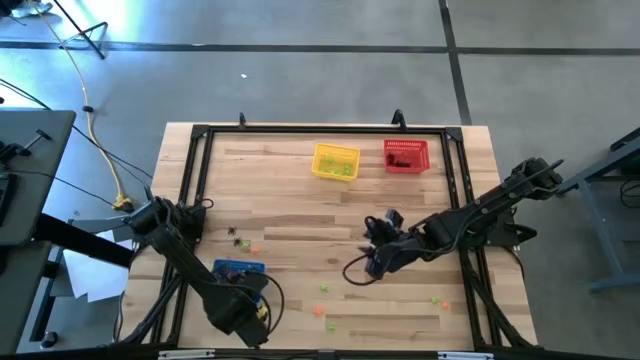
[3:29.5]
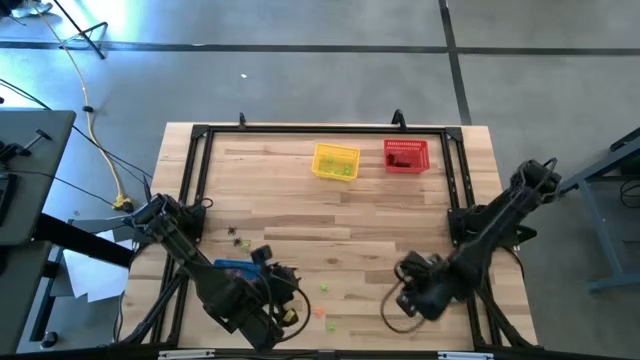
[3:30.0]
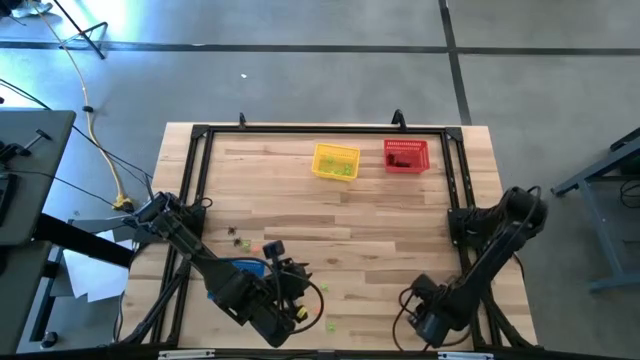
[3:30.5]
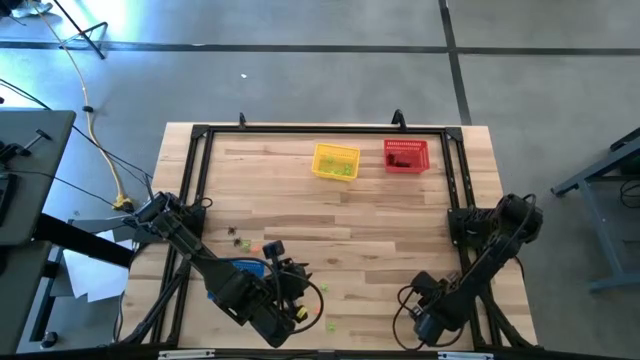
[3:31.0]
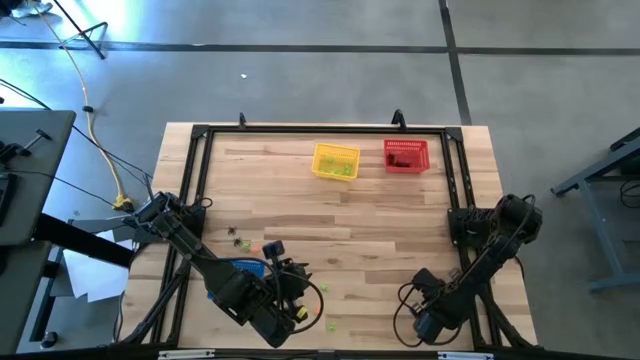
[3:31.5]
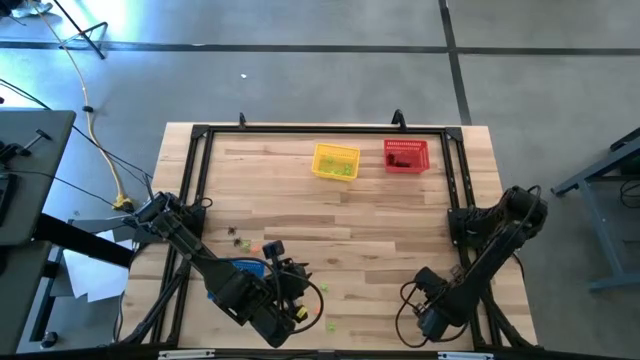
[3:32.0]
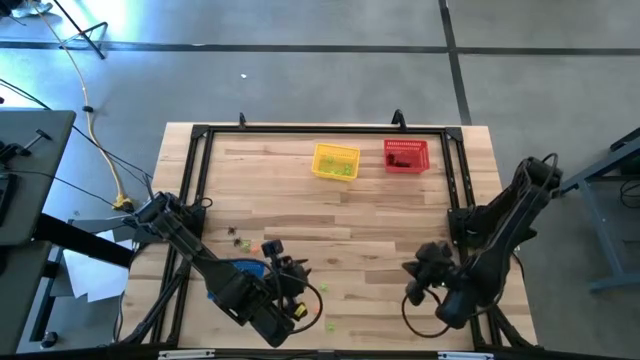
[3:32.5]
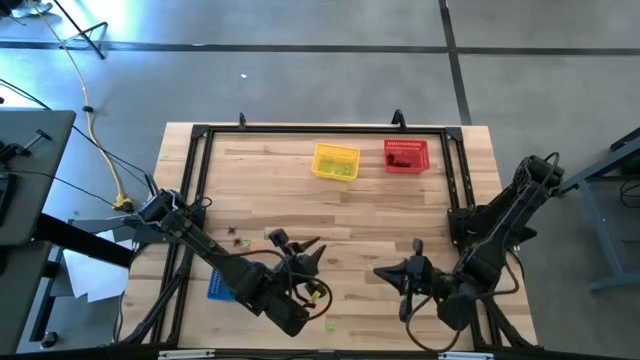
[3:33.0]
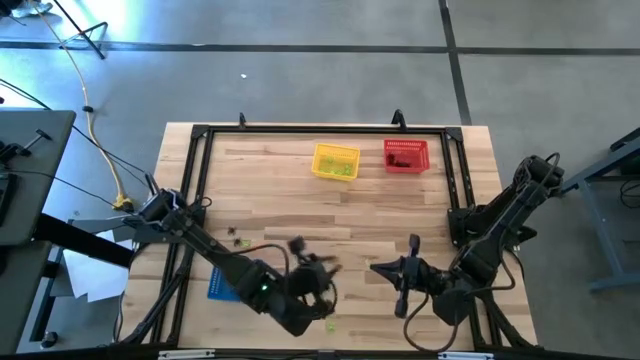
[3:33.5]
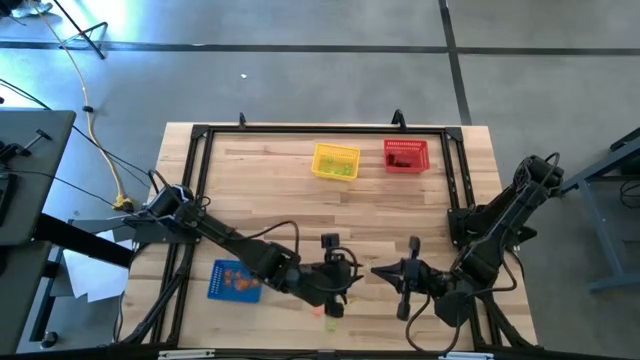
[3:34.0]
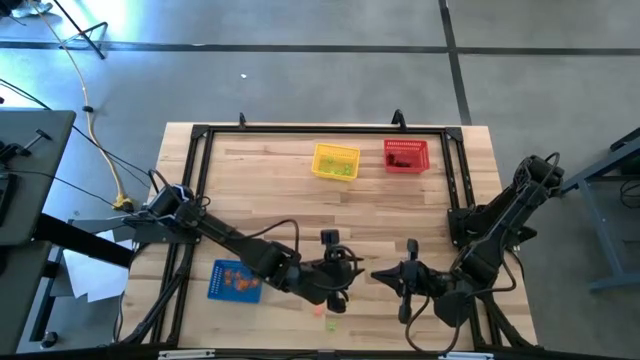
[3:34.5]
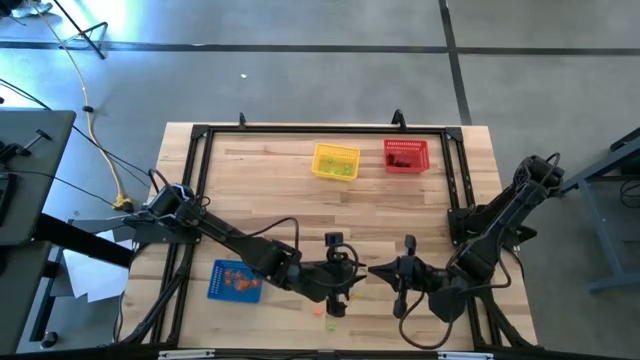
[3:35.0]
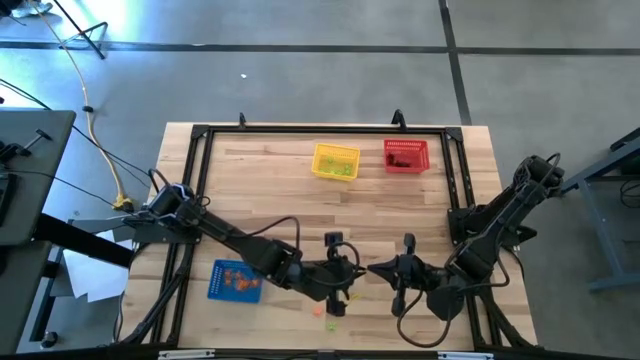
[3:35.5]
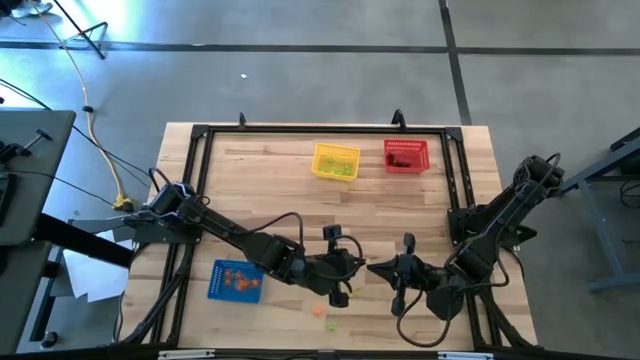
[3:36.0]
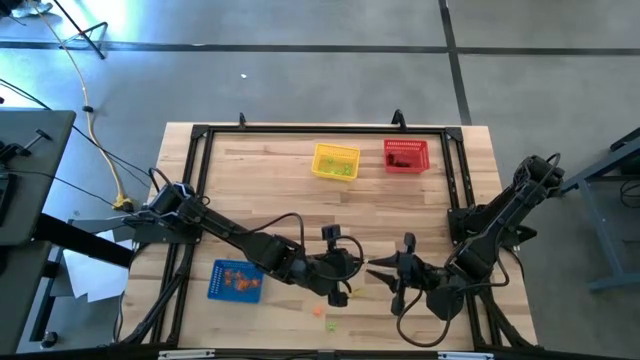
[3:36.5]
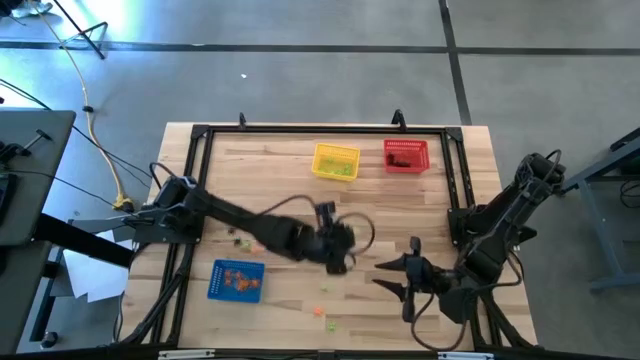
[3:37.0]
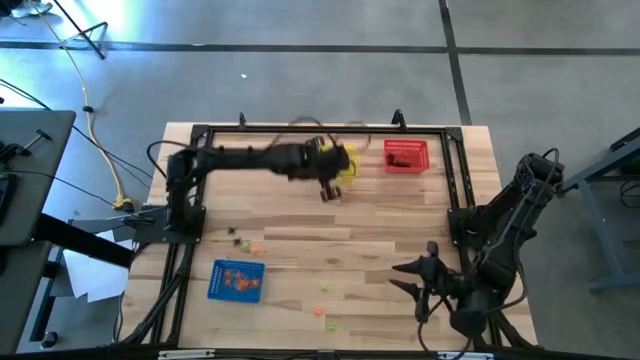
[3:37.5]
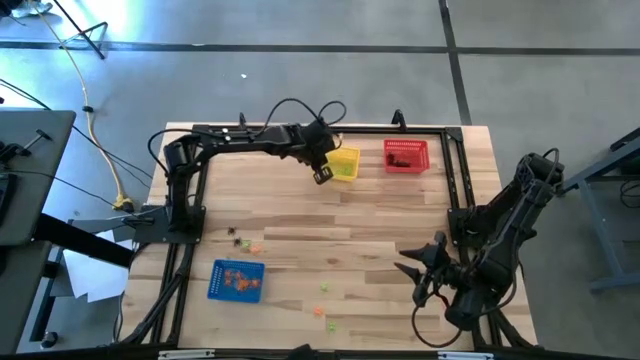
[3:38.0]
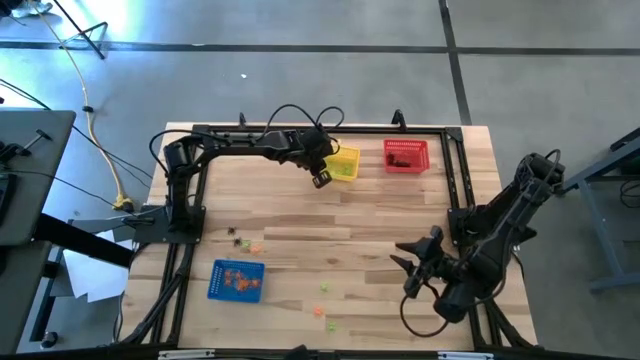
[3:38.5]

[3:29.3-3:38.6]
Task: Sort Halloween decoration
Put the green spider toy into the yellow bin

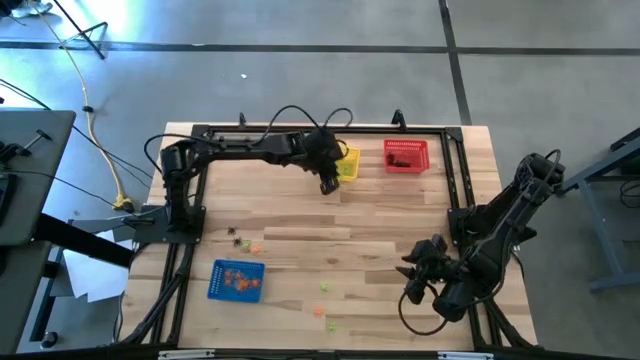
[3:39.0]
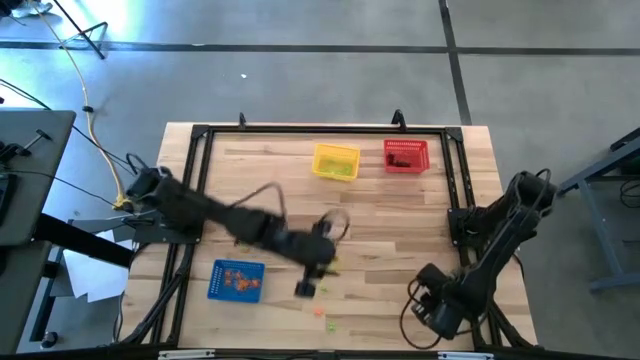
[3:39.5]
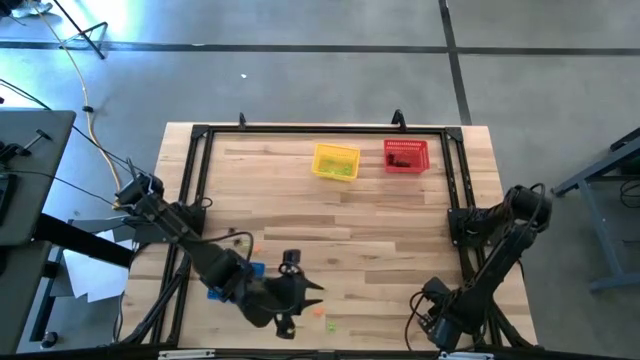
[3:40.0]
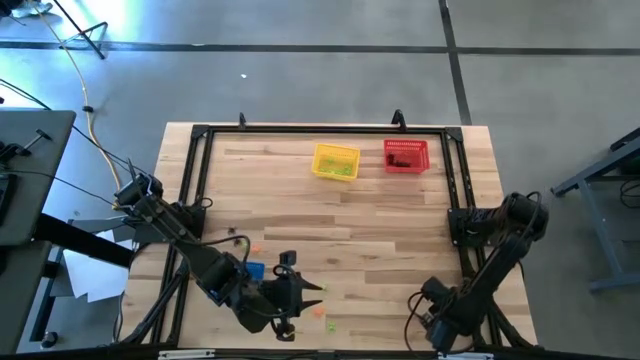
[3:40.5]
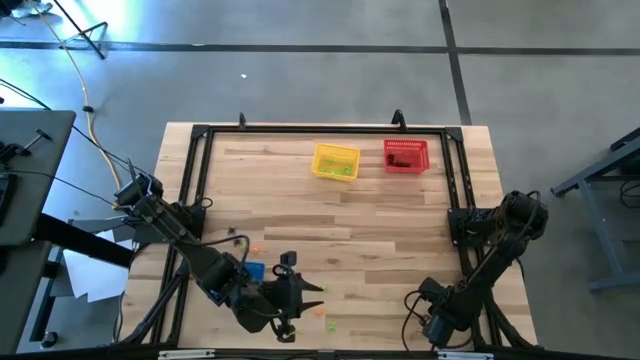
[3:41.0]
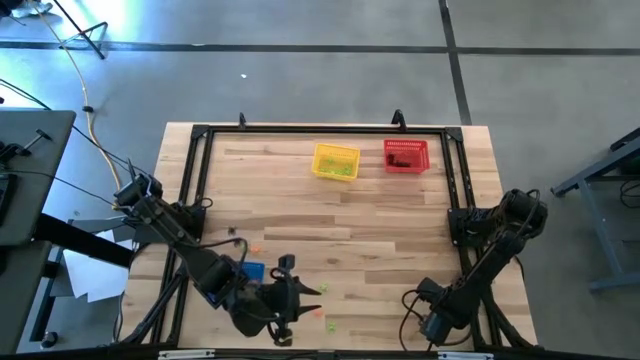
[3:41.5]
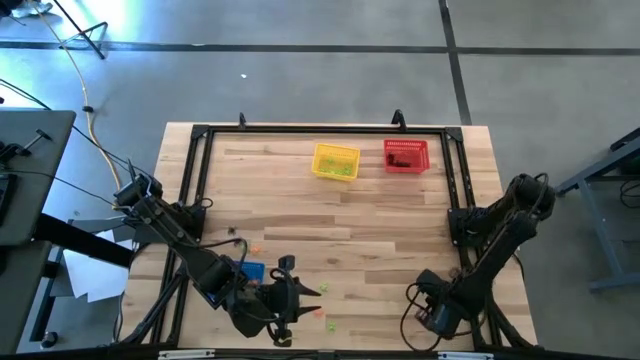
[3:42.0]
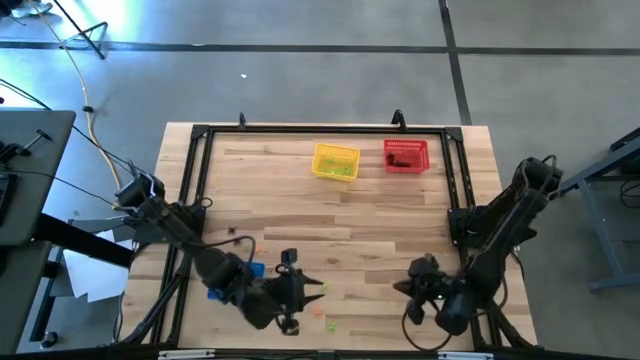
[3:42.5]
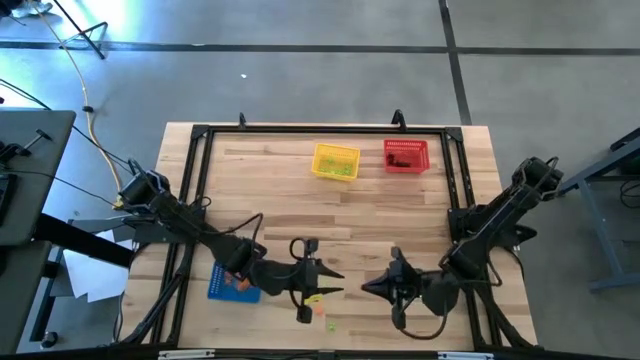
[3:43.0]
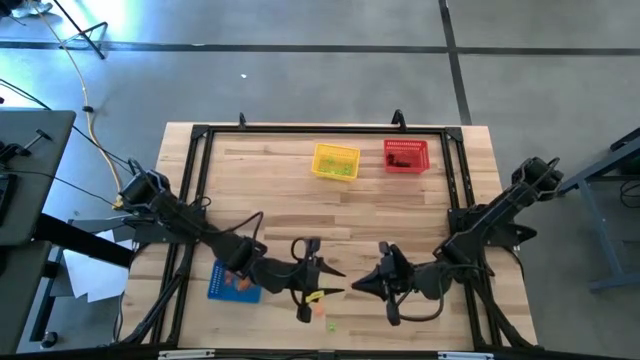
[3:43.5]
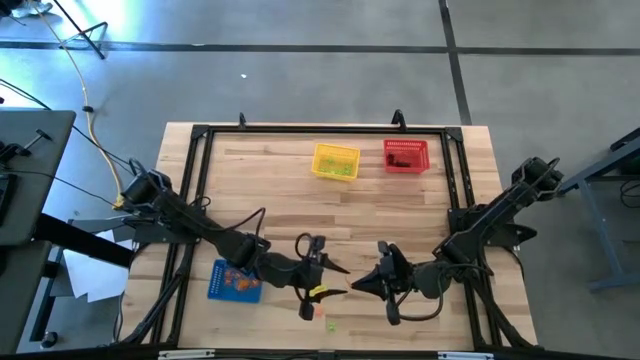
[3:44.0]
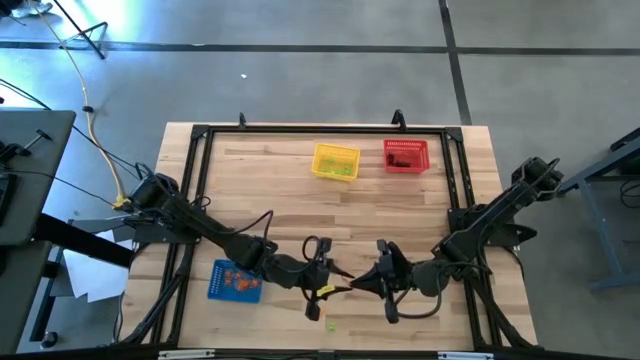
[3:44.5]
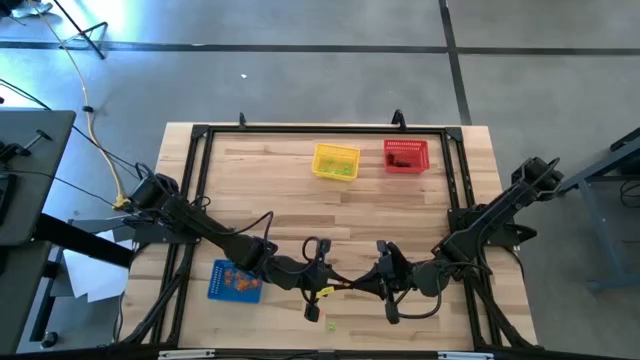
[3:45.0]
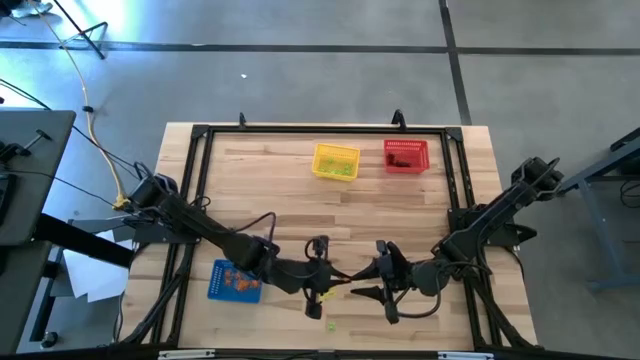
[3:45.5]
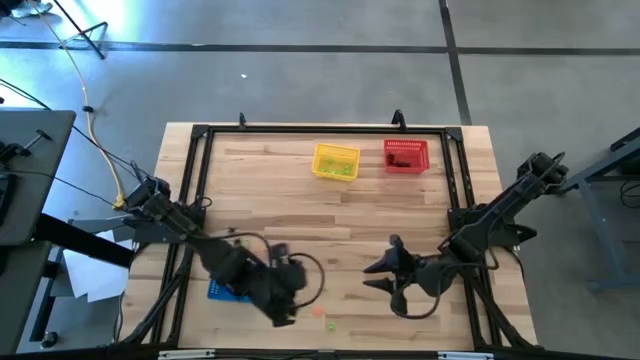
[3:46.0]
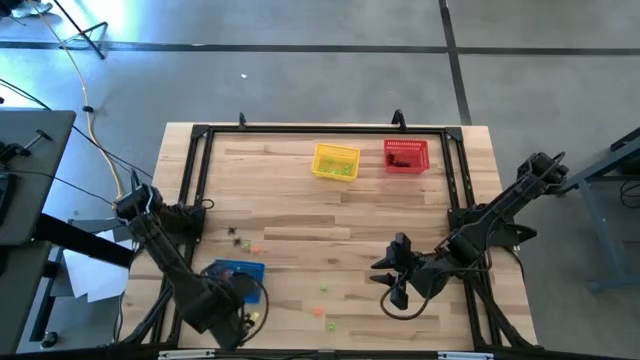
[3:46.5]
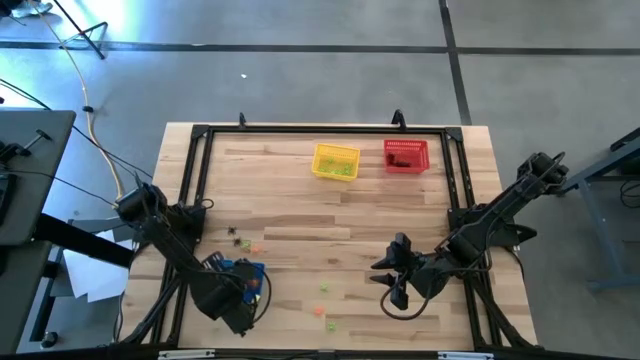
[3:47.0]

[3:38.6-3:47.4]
Put the spider toy into the blue bin
